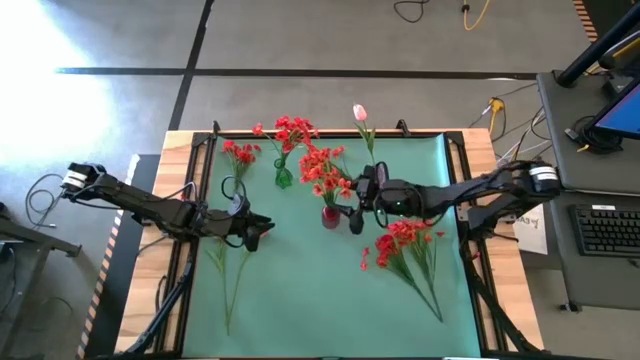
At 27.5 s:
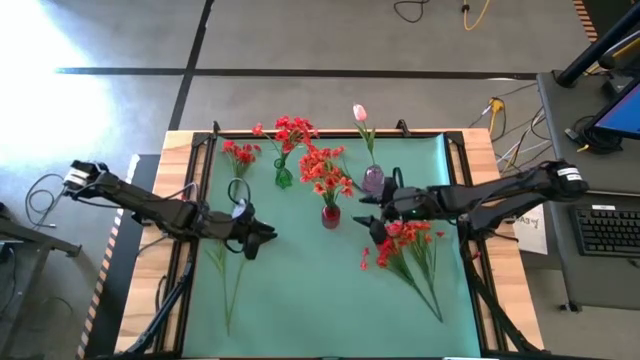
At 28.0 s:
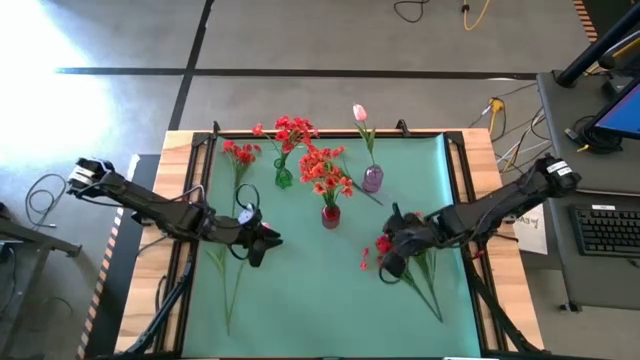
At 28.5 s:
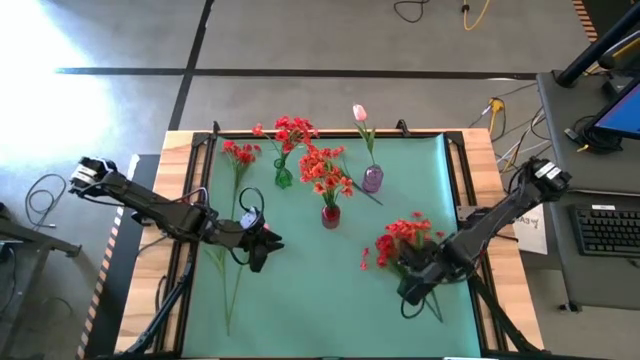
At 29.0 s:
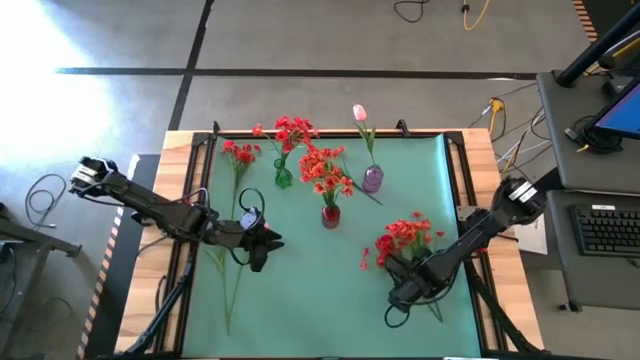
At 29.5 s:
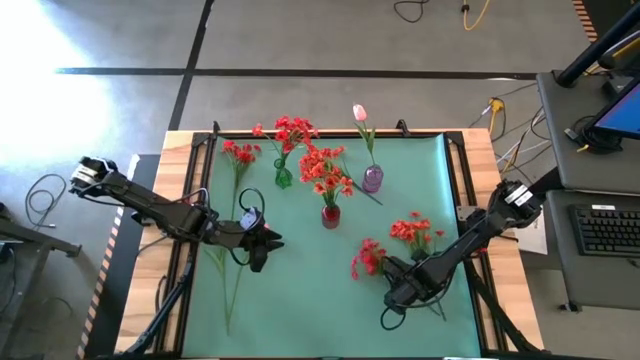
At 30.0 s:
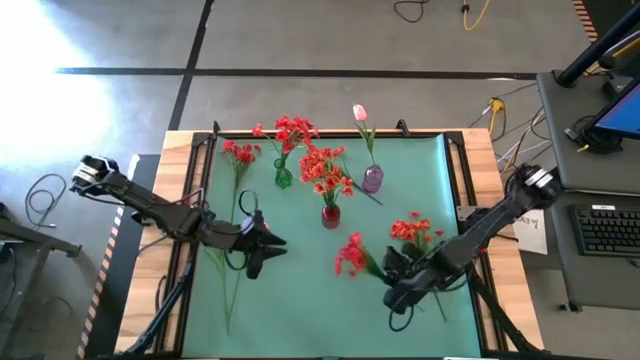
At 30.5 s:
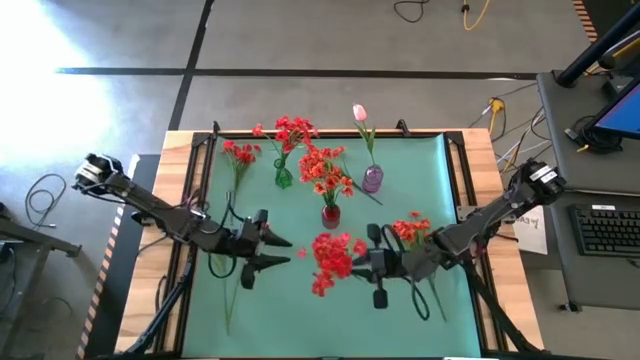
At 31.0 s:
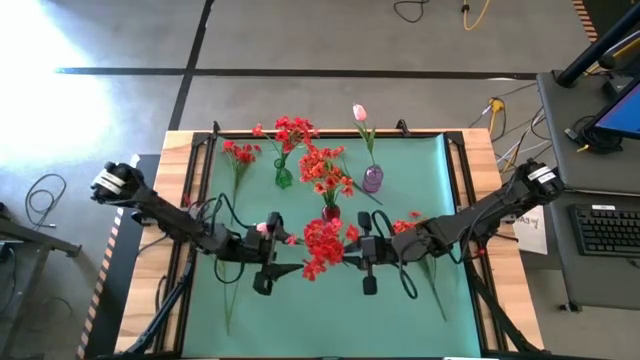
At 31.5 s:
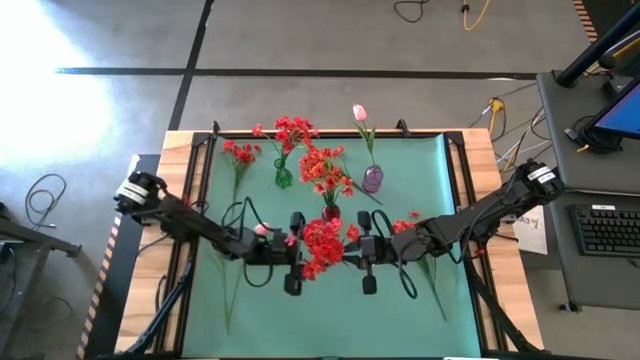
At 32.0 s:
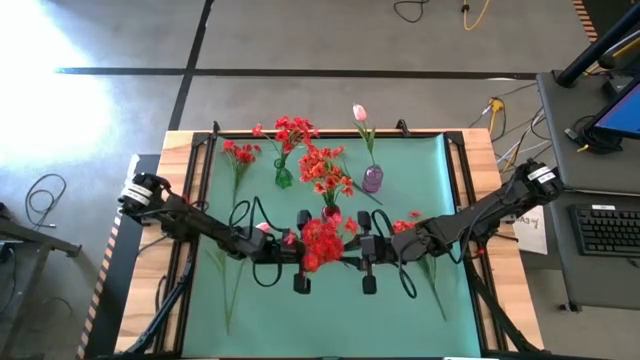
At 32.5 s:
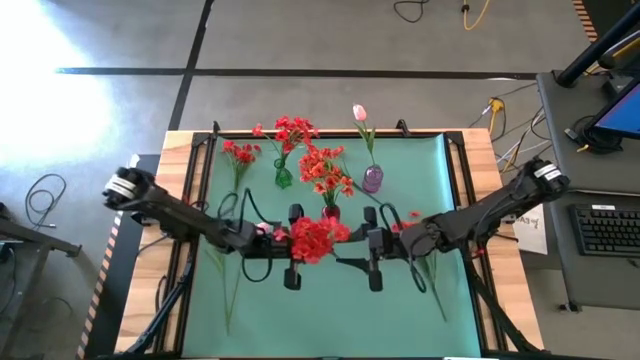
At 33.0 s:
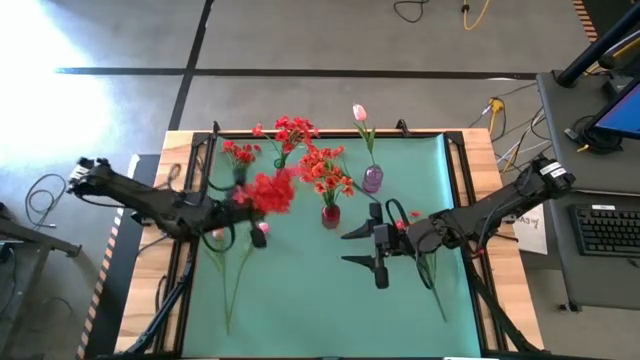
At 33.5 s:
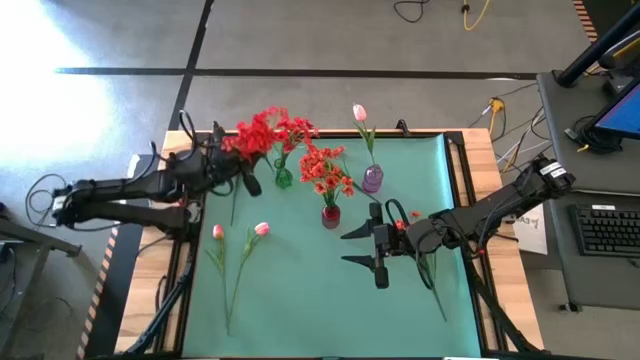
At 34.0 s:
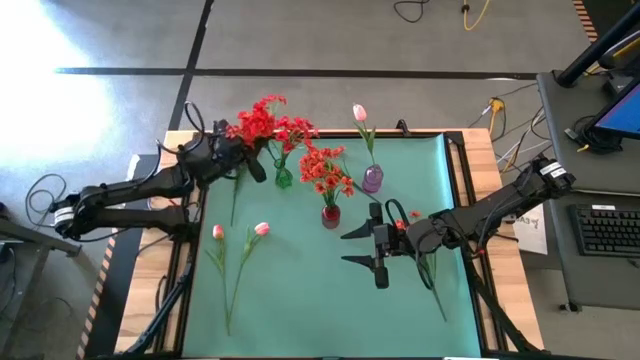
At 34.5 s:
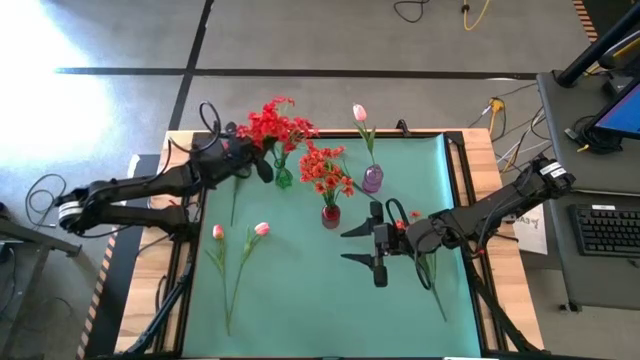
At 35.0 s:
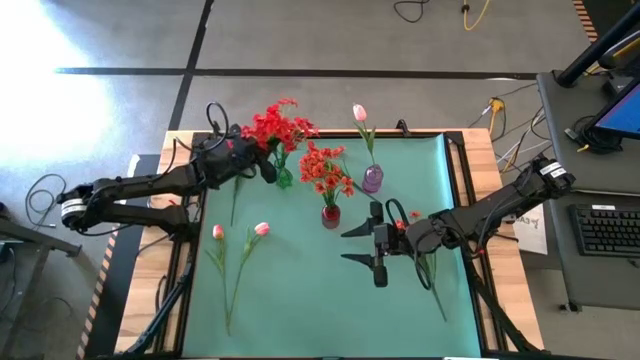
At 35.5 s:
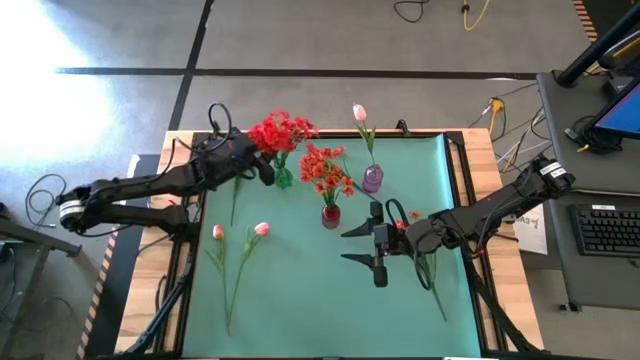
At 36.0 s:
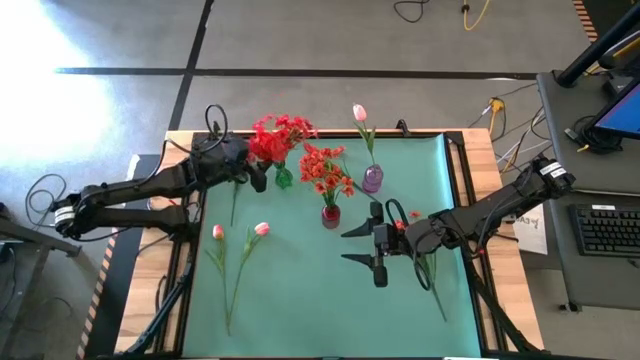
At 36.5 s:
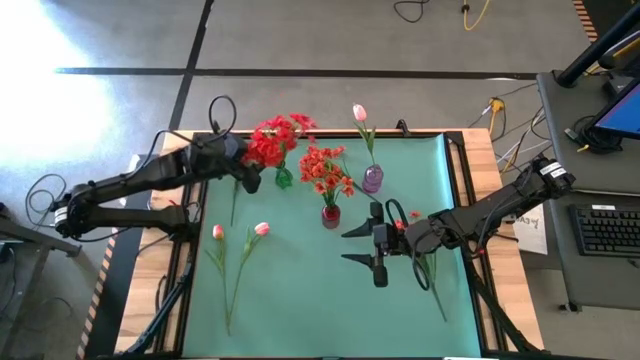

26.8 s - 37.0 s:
Task: Sort flowers into vase by color
Put the red flowers into the green vase

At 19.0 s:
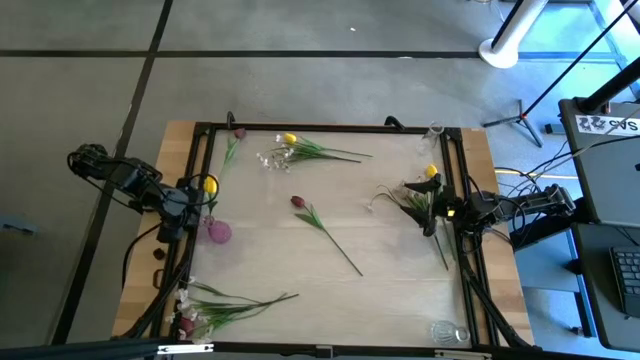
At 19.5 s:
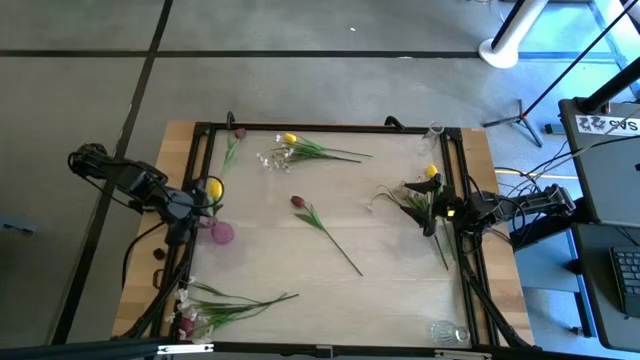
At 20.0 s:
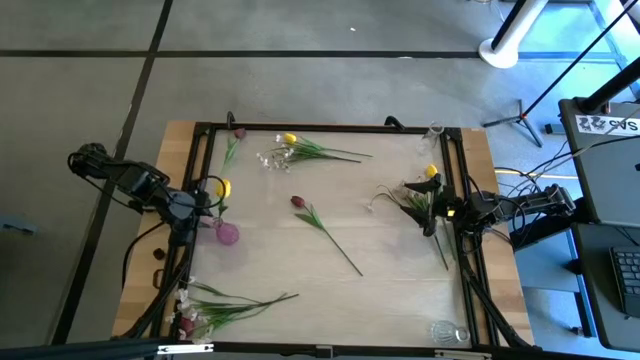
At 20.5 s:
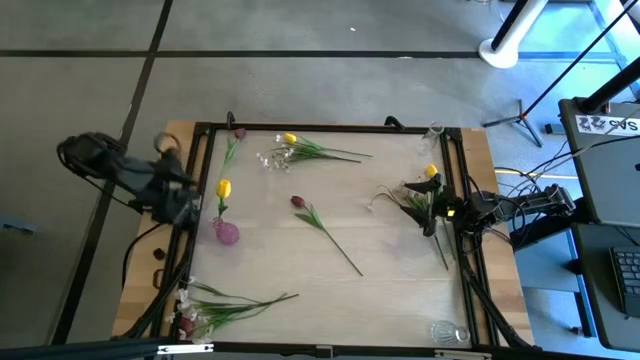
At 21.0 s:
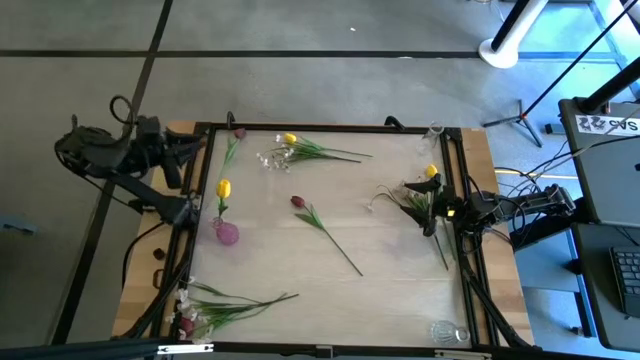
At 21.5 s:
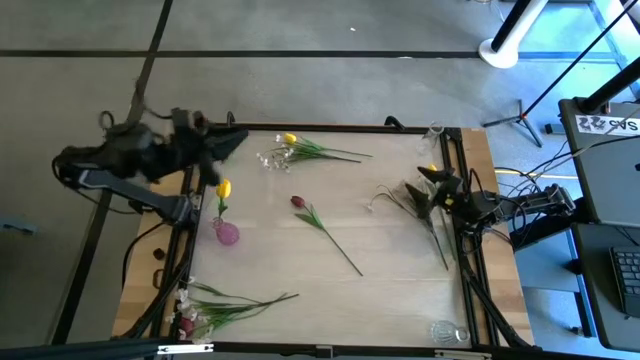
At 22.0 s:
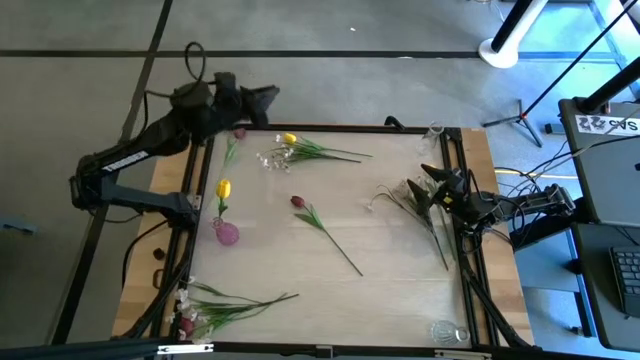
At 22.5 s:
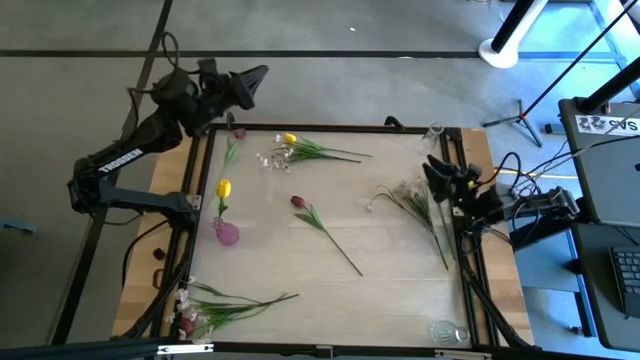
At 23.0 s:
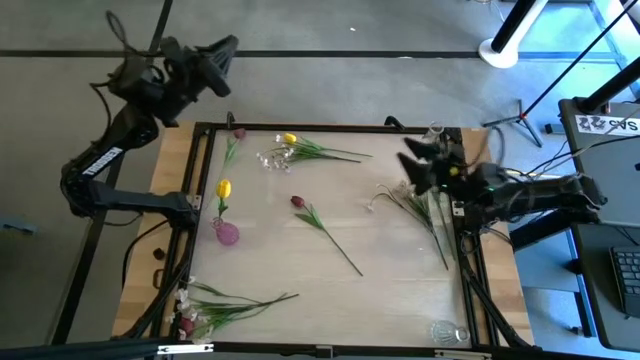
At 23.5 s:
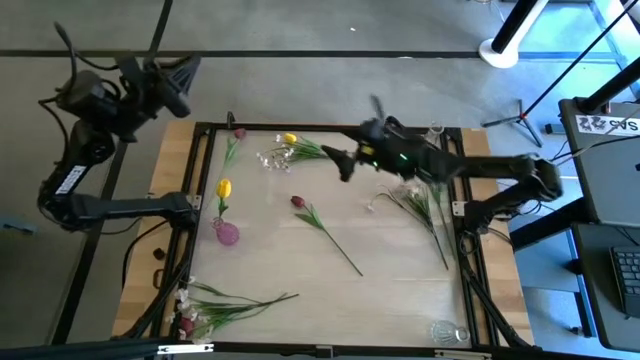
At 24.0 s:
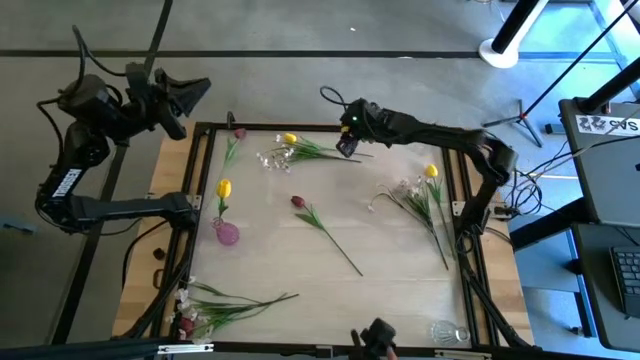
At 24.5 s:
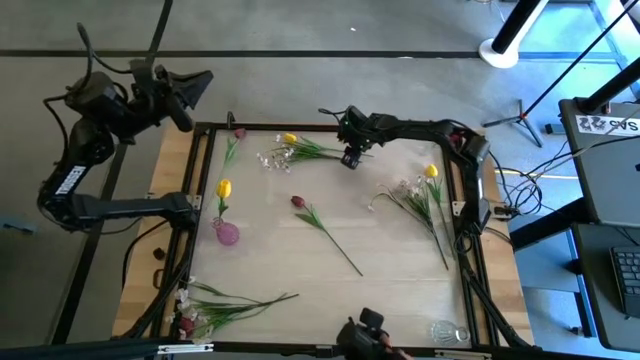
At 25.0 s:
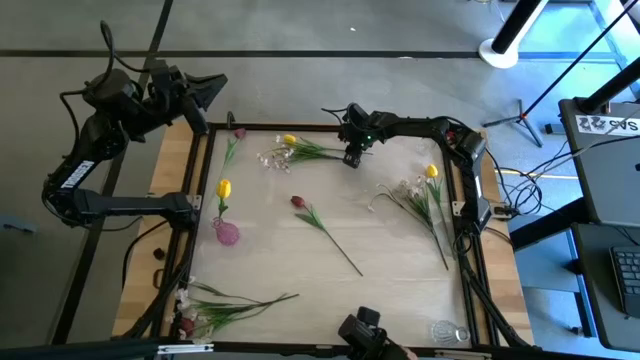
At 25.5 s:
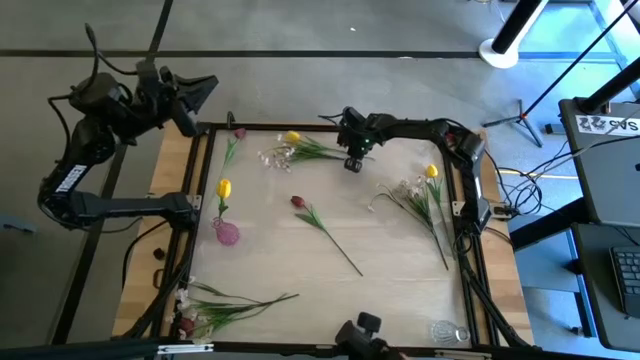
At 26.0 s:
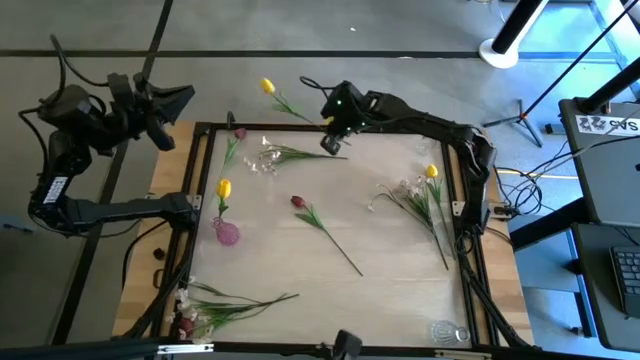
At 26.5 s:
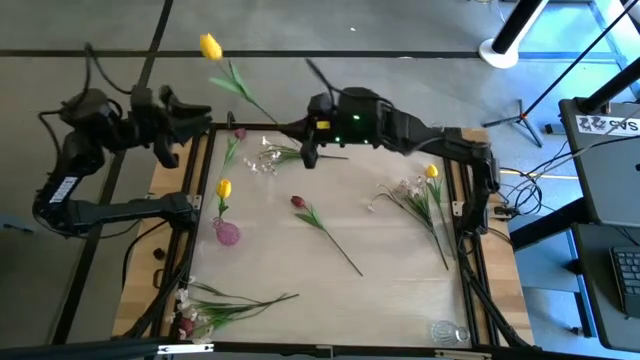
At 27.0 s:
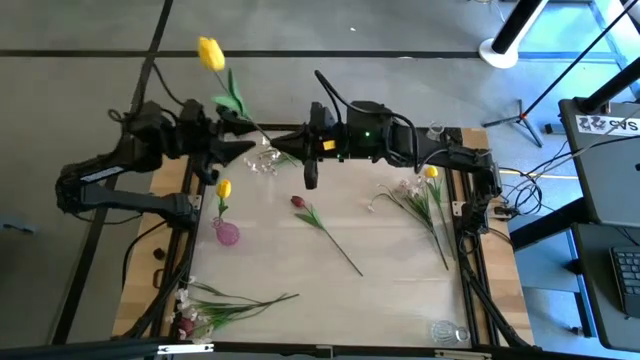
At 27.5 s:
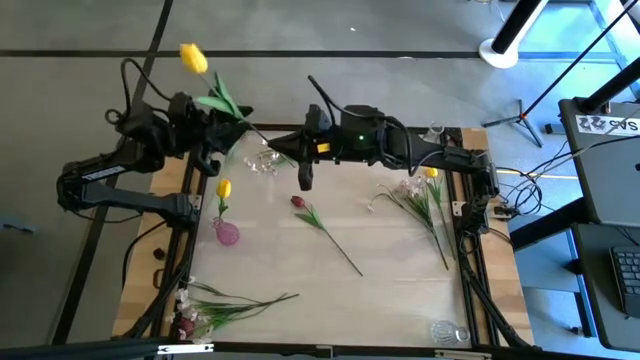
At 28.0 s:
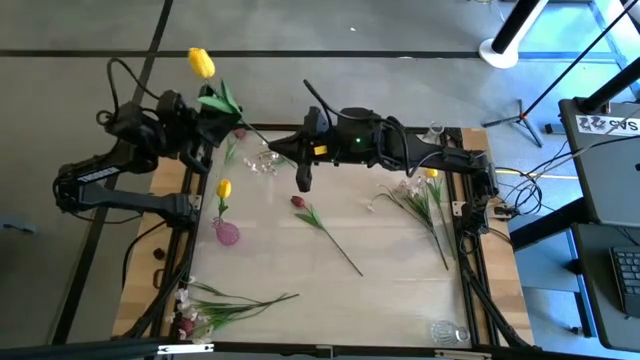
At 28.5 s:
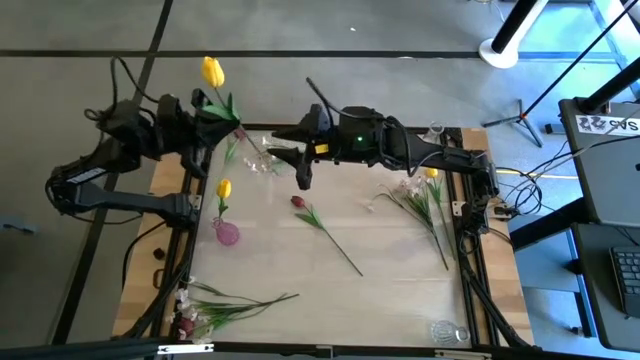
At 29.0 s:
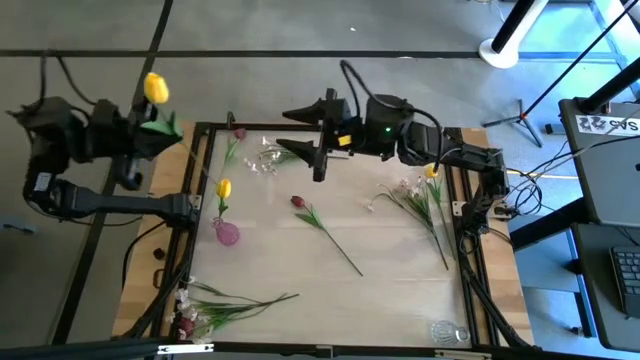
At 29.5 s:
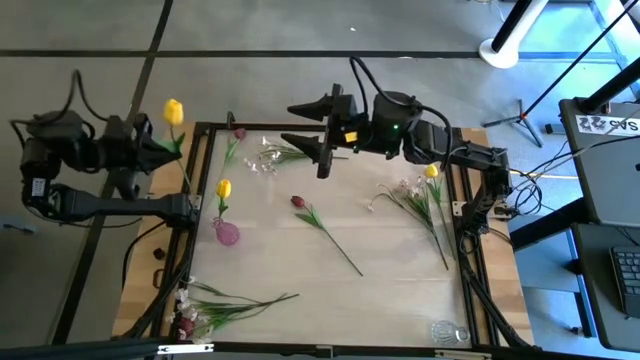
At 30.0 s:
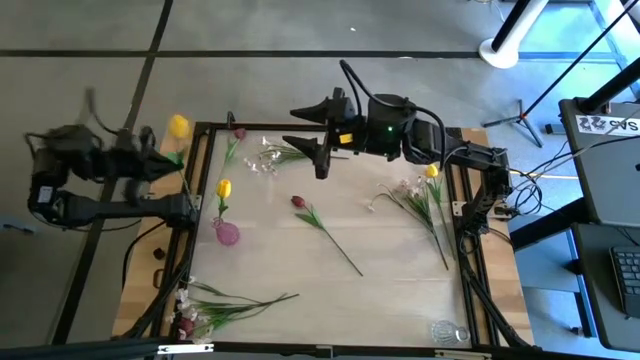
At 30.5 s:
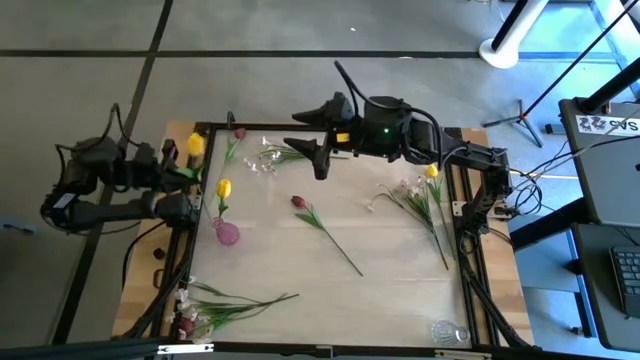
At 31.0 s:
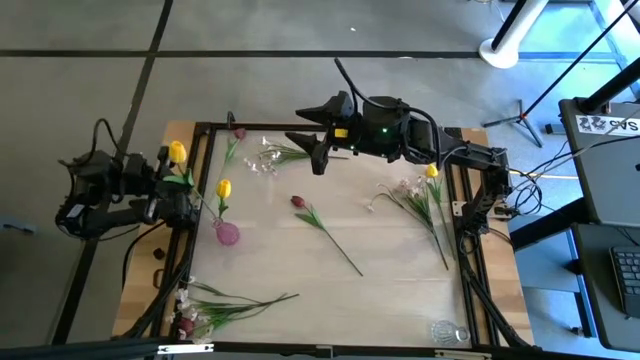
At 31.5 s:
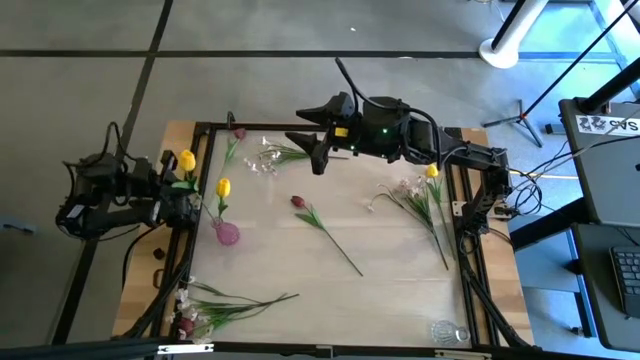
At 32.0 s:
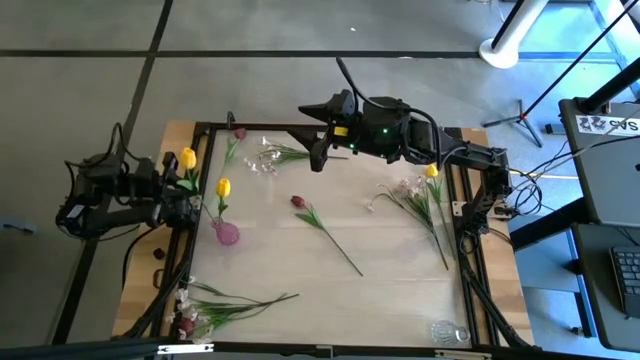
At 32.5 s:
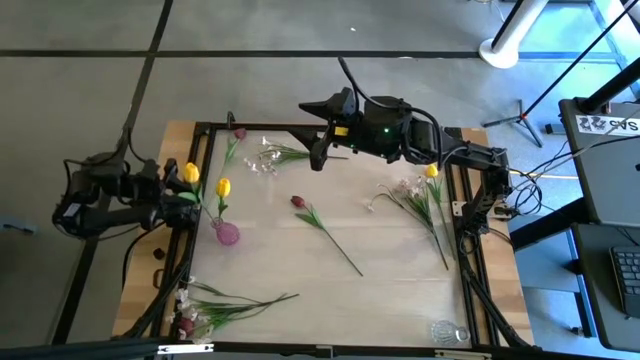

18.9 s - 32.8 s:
Task: Sort flowers into vase by color
Put the top yellow tulip into the purple flower vase
